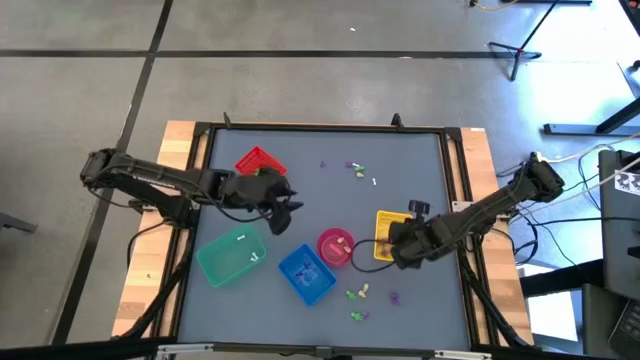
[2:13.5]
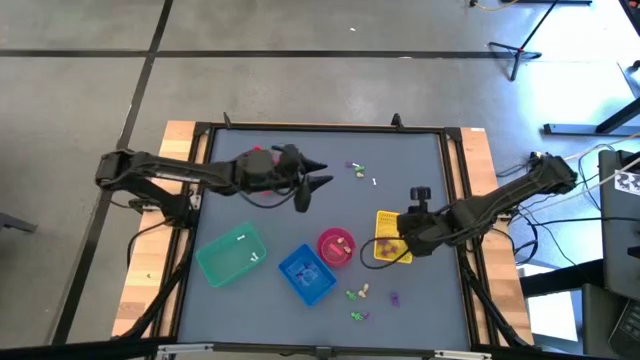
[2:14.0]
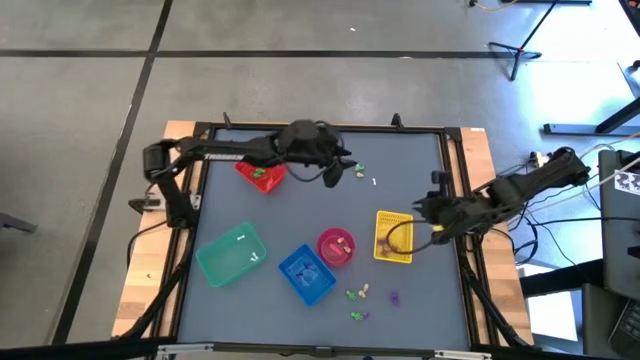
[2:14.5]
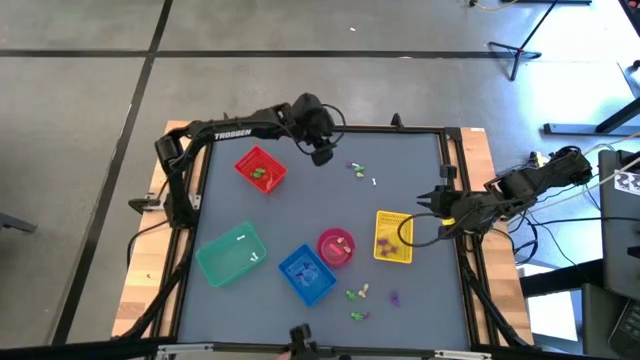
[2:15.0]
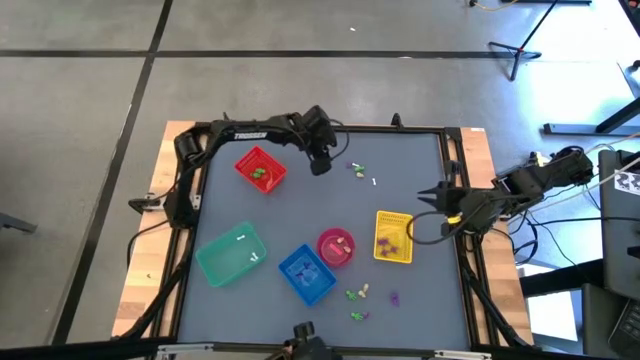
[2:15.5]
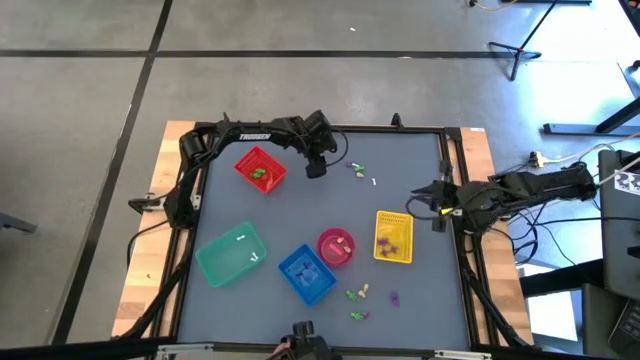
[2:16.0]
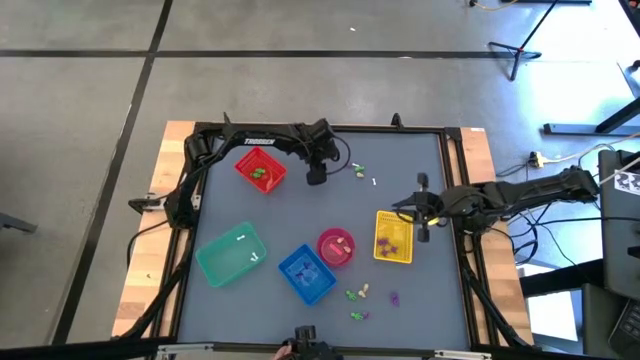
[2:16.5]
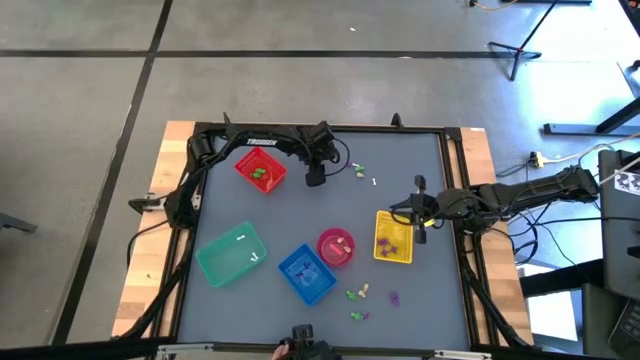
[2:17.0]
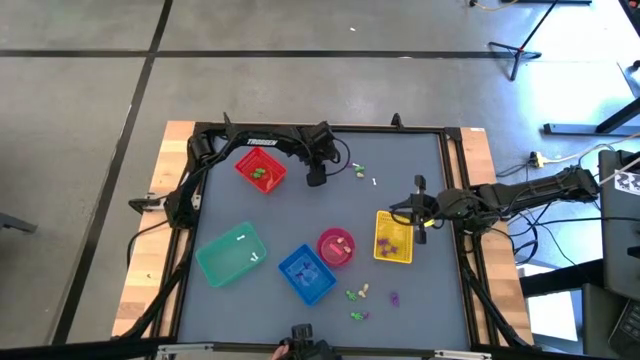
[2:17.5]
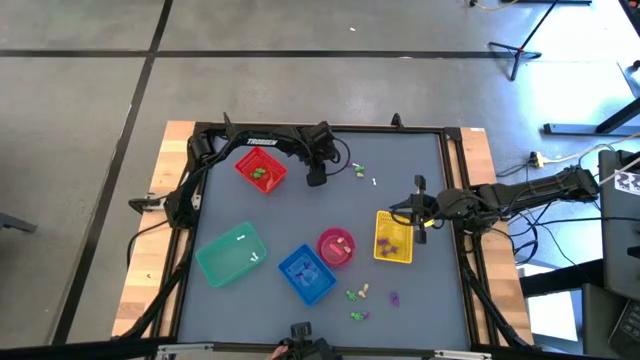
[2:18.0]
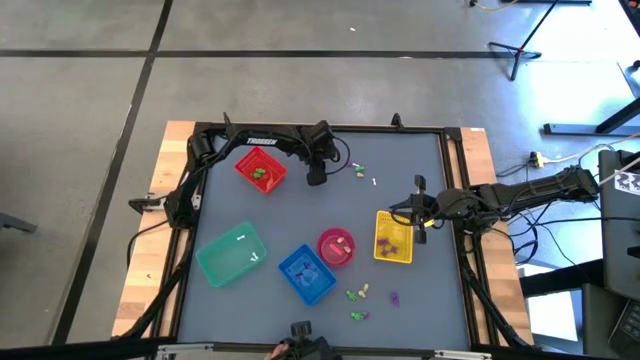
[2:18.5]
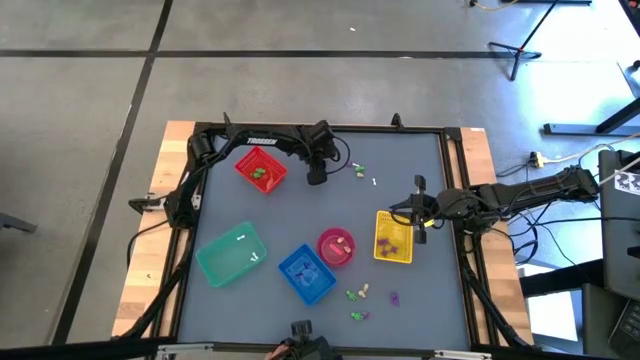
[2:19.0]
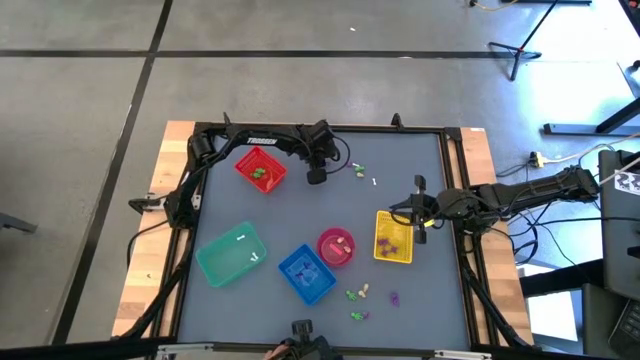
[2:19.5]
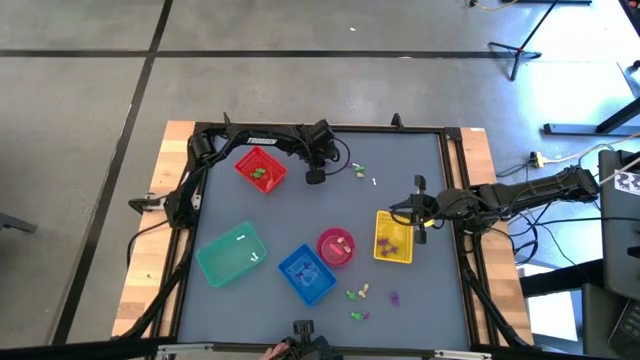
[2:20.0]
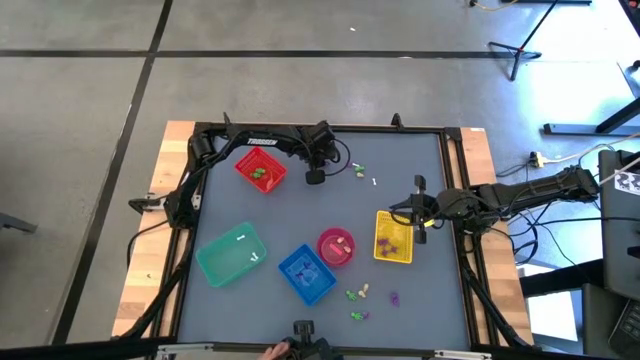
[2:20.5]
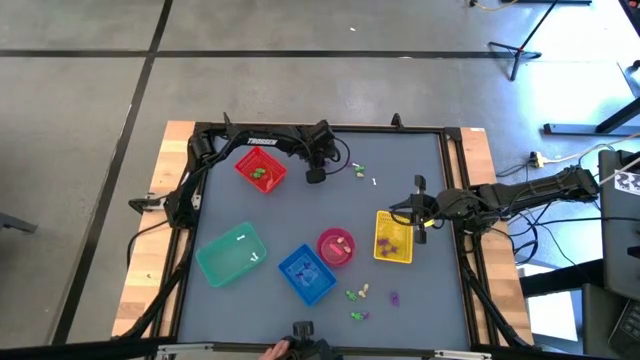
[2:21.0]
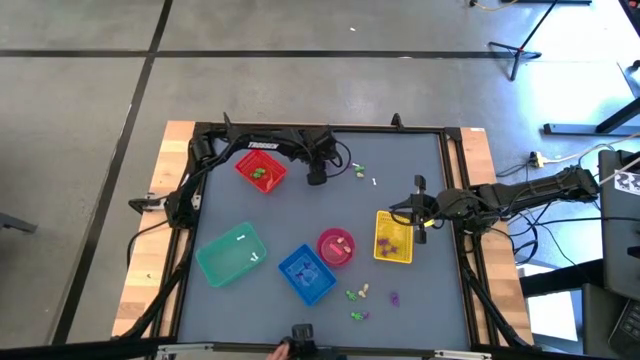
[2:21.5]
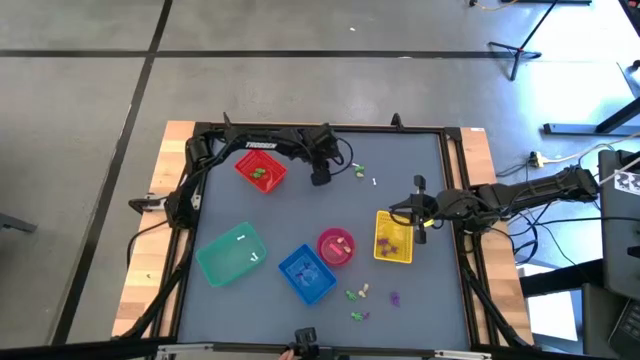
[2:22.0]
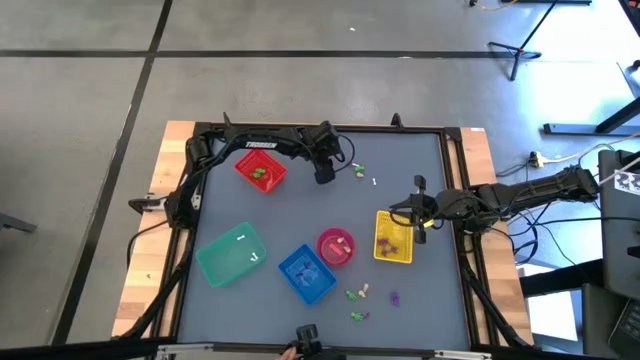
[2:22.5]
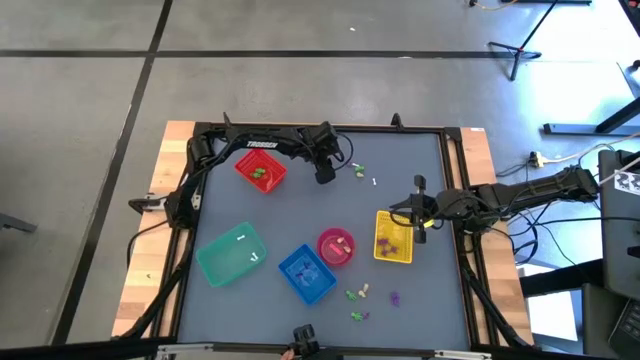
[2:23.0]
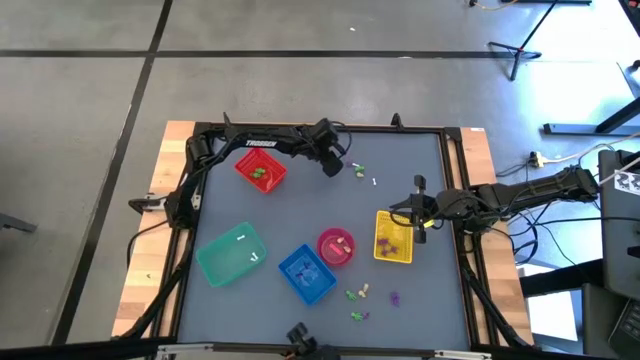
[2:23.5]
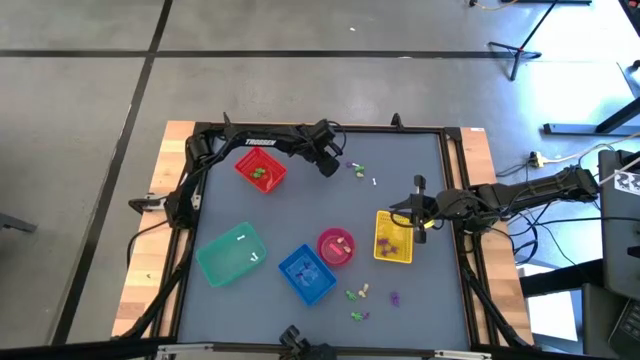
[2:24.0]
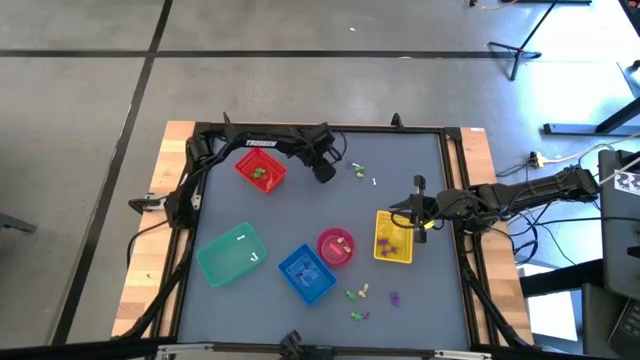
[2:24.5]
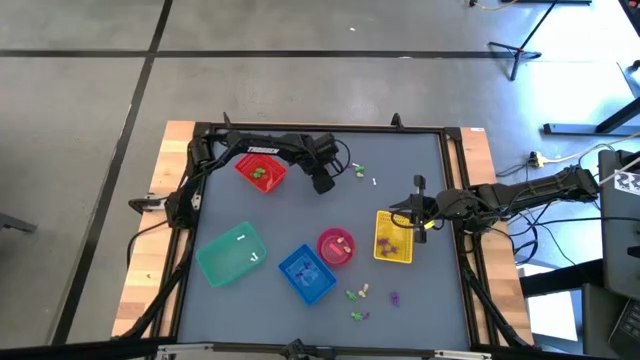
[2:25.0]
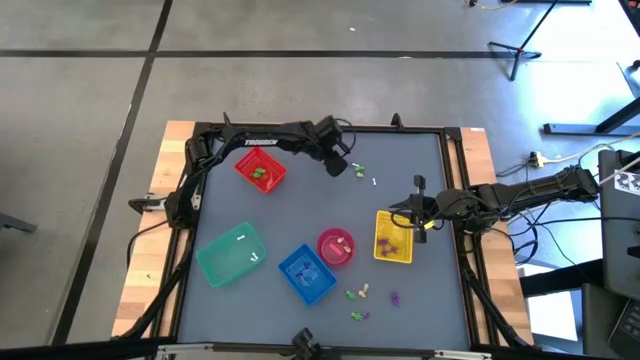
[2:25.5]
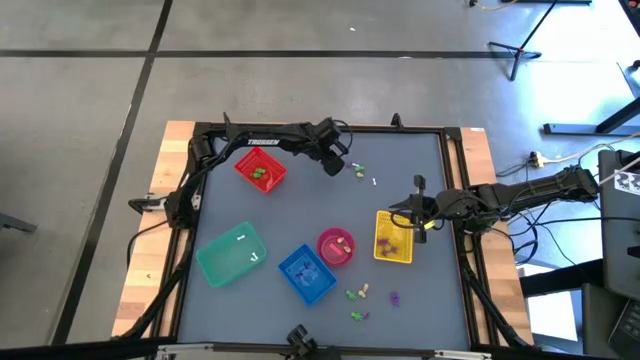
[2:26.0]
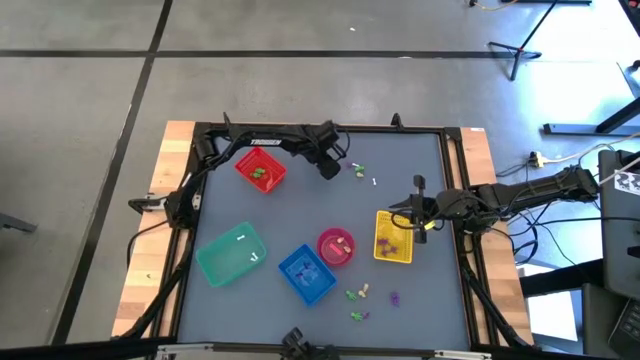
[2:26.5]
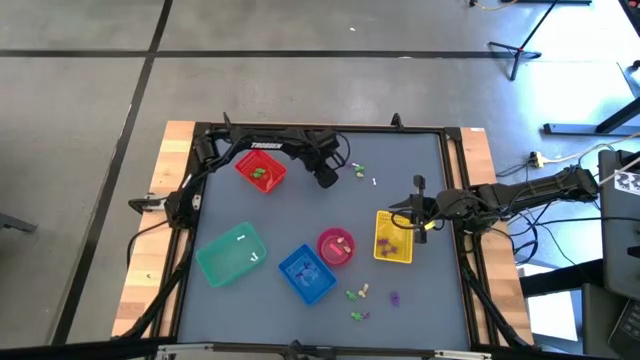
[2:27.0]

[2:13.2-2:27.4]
Task: Sort Halloween decoration
Put the violet witch hat toy into the blue bin

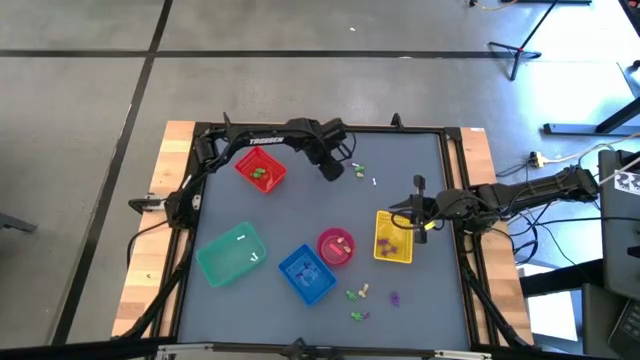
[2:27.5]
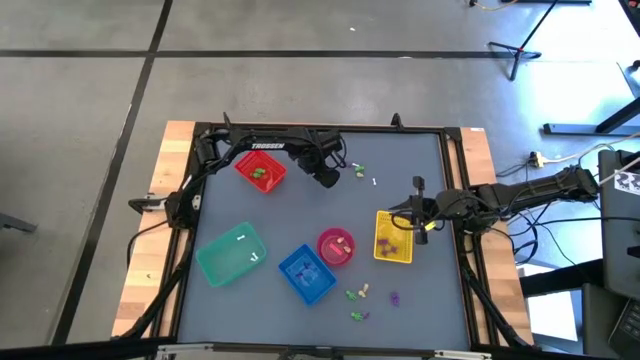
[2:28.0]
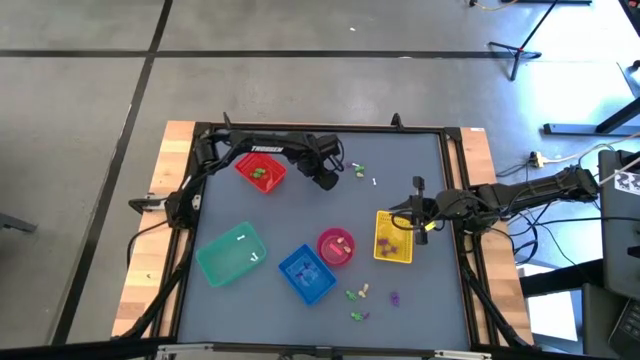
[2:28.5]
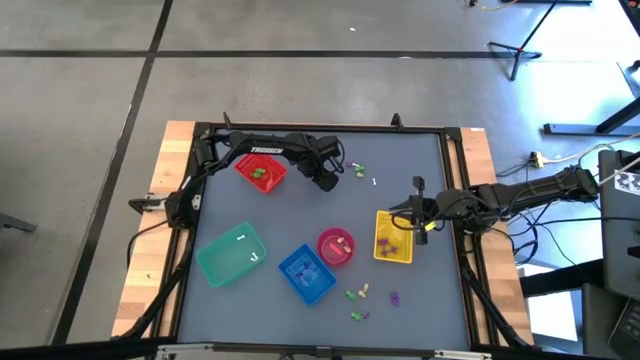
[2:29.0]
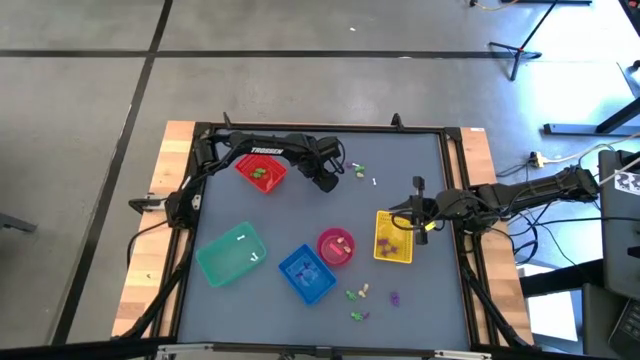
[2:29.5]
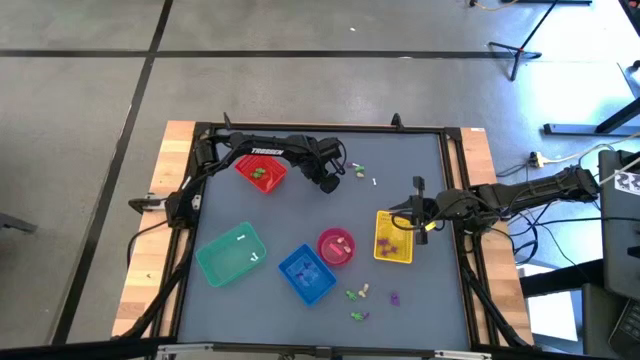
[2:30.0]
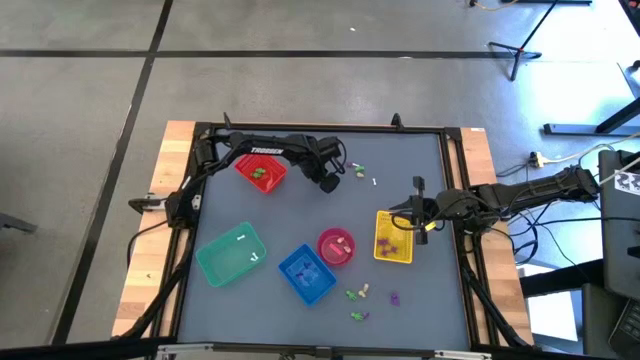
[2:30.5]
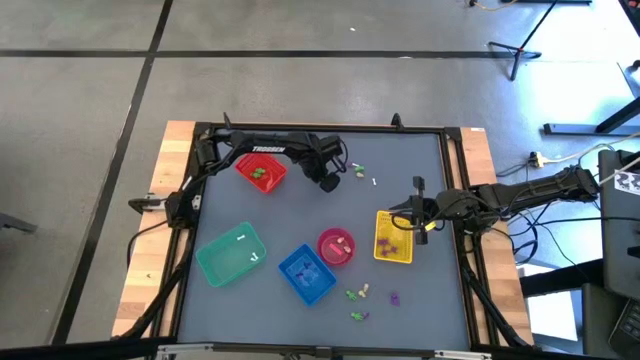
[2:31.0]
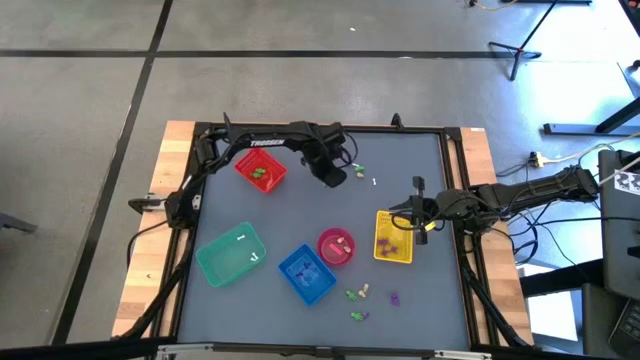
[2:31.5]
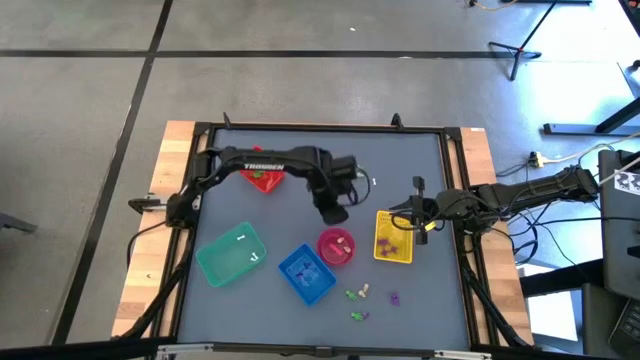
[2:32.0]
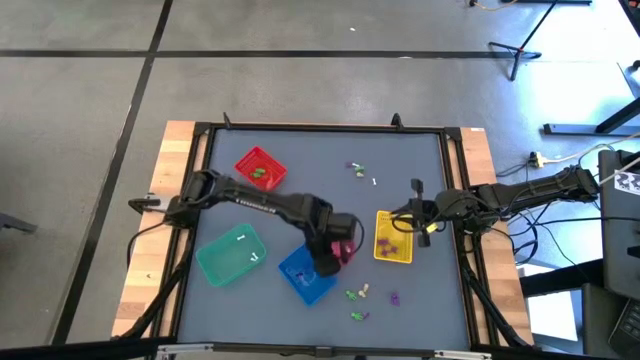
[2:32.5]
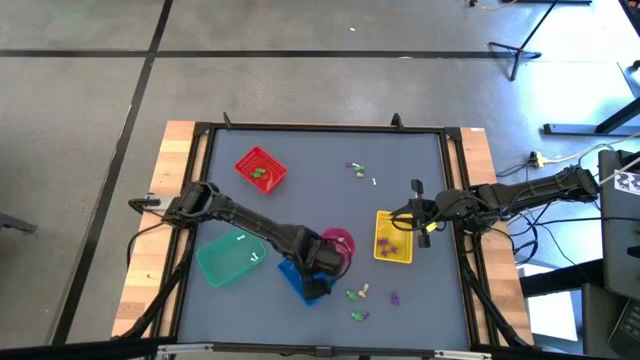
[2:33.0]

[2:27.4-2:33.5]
Put the violet witch hat toy into the blue bin

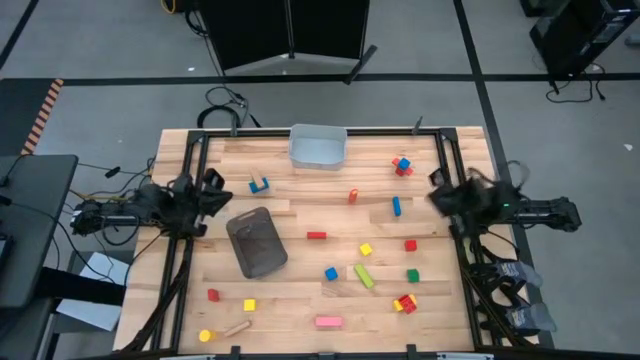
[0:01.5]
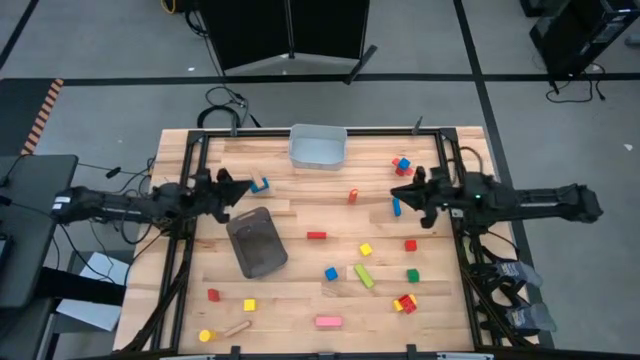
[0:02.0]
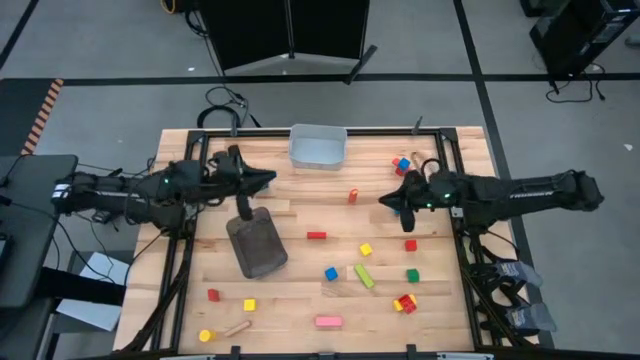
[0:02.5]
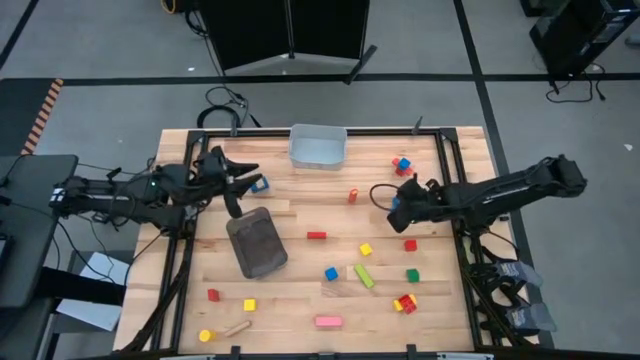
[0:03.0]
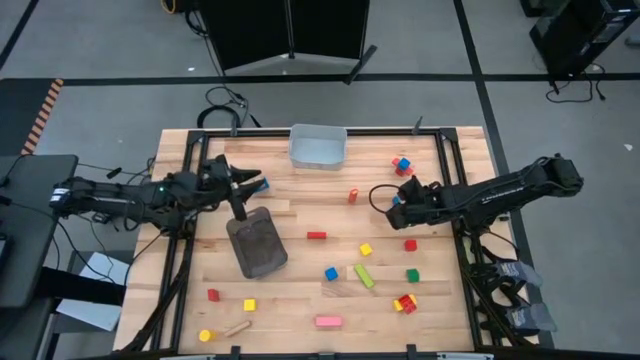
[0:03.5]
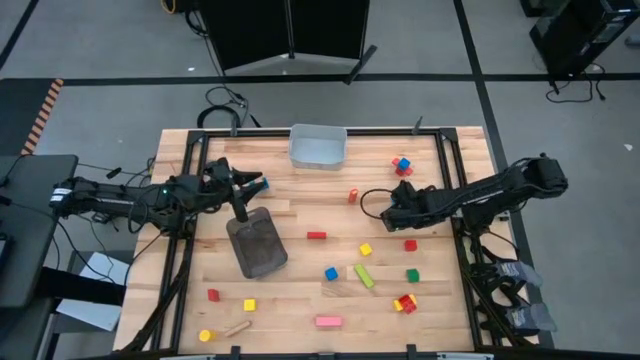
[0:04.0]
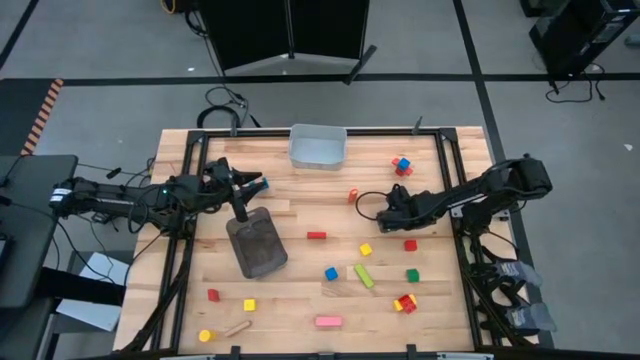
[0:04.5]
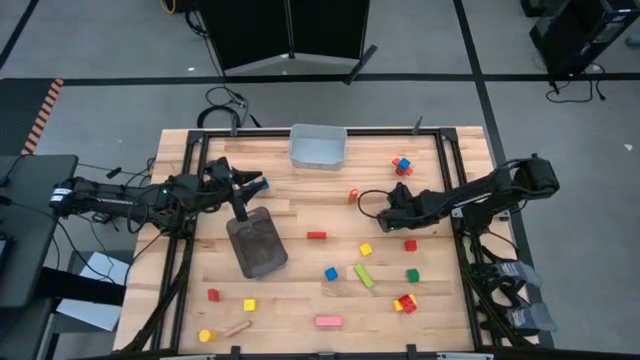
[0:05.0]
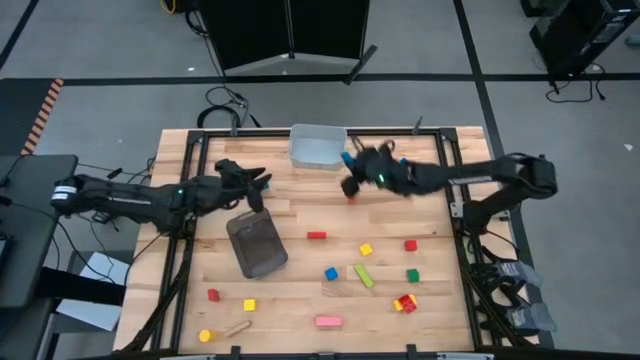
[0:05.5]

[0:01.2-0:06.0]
Task: Sort blocks by size
Put the blue rectangular block into the gray bin
